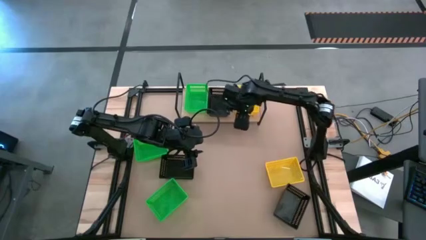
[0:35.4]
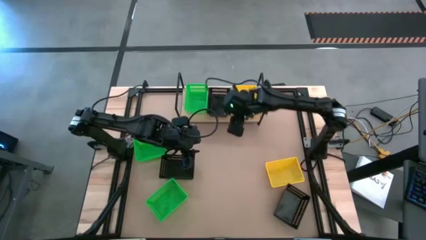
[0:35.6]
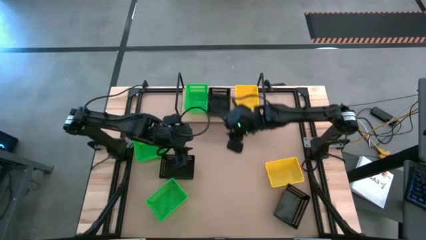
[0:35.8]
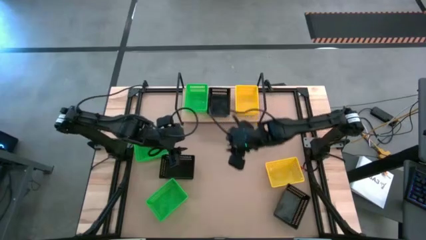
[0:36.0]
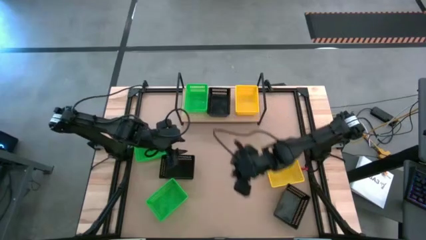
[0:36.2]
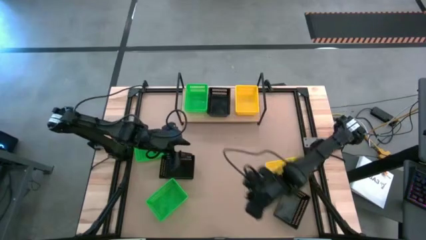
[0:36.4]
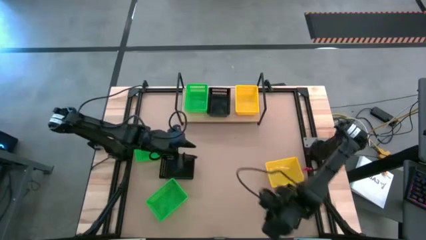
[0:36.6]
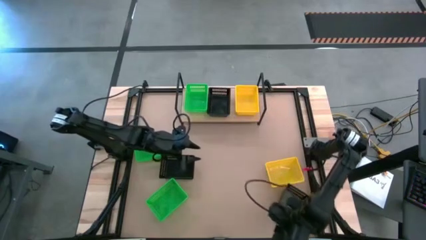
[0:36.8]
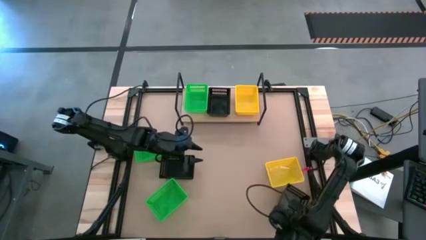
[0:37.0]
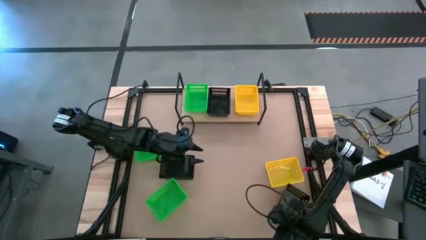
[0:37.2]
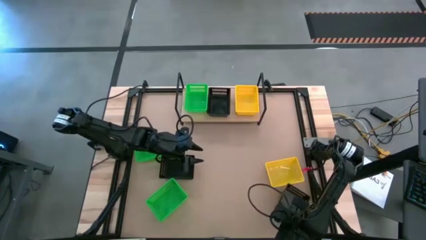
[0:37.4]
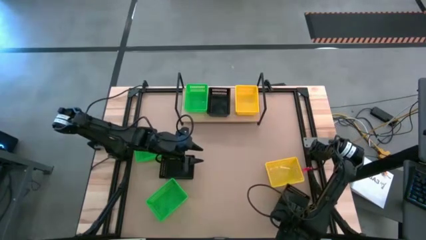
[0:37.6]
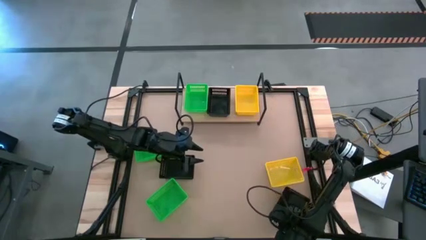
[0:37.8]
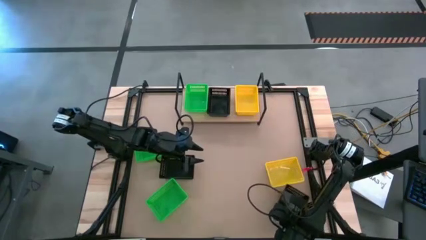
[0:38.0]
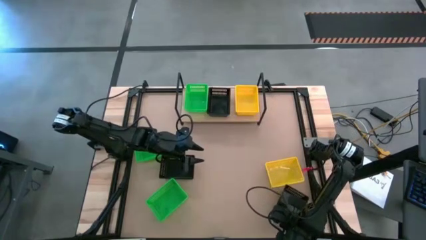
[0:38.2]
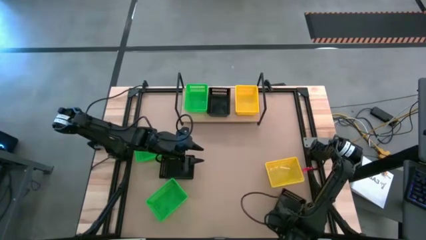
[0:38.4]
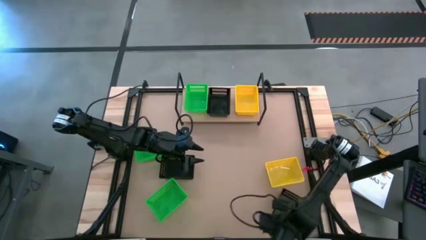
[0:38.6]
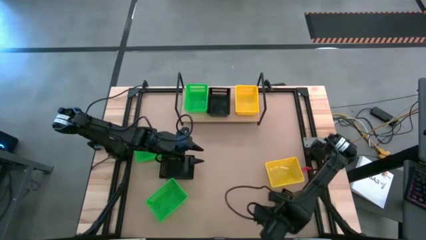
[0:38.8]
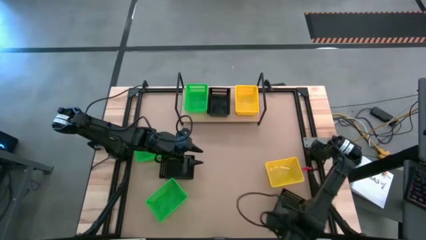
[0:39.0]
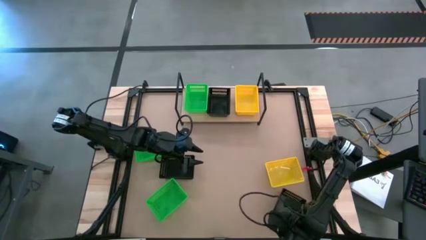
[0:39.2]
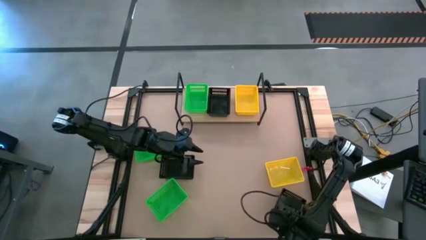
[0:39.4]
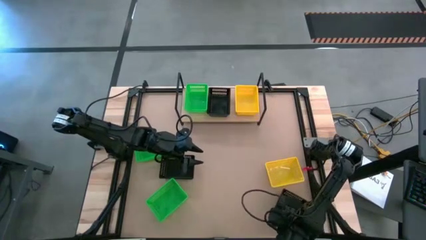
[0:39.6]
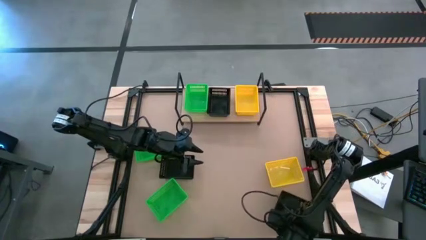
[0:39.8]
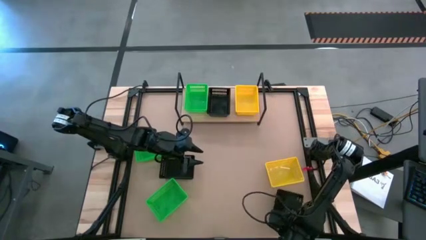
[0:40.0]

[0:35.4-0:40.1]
Task: Stack baskets on shelf by color
Stack the right black basket on top of the black basket on the shelf

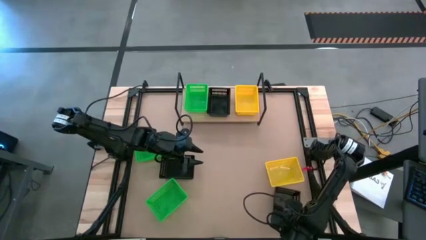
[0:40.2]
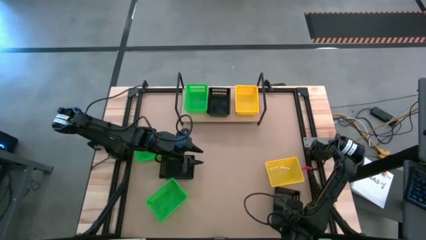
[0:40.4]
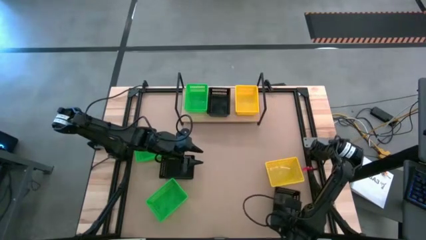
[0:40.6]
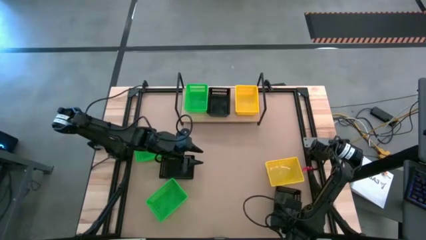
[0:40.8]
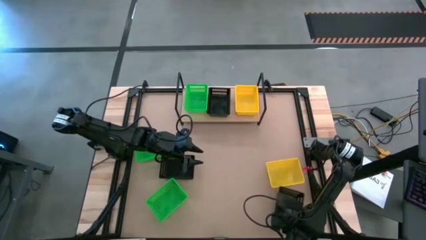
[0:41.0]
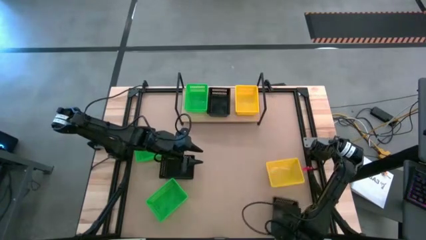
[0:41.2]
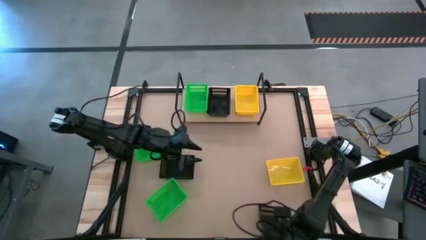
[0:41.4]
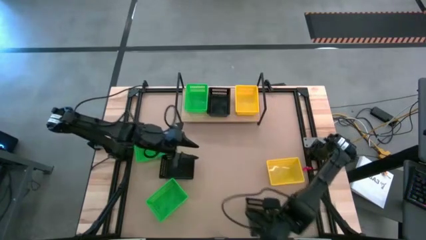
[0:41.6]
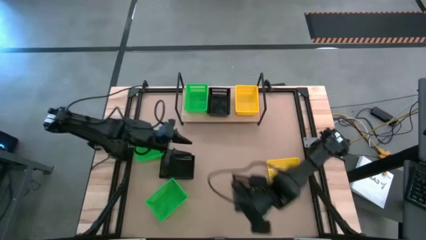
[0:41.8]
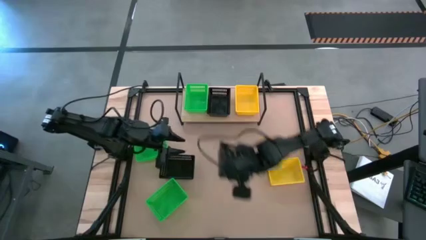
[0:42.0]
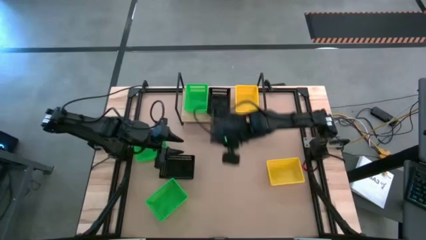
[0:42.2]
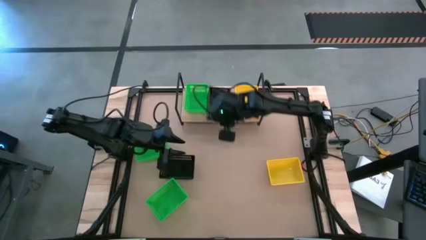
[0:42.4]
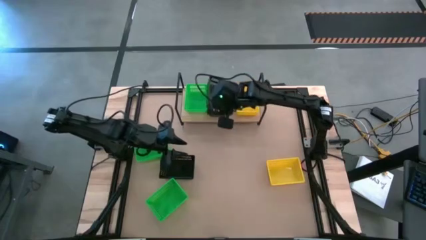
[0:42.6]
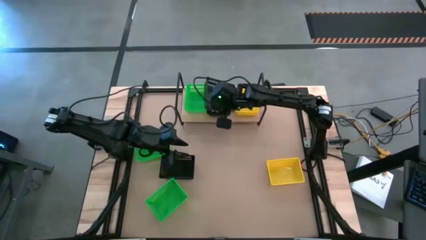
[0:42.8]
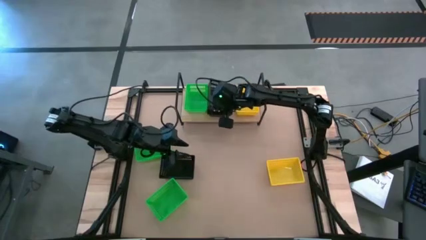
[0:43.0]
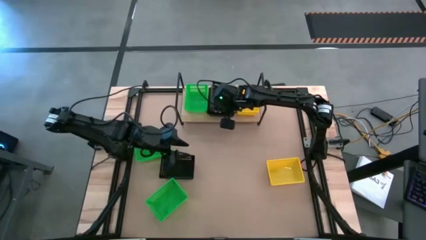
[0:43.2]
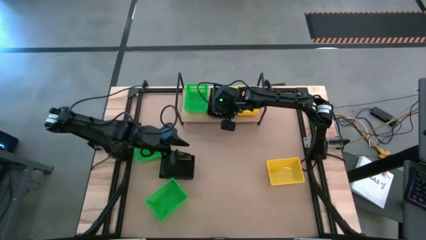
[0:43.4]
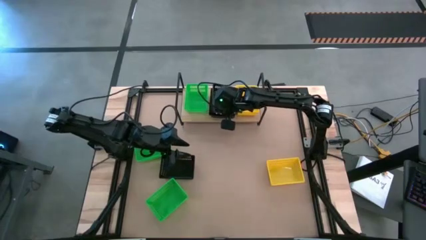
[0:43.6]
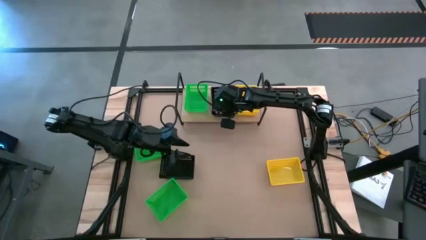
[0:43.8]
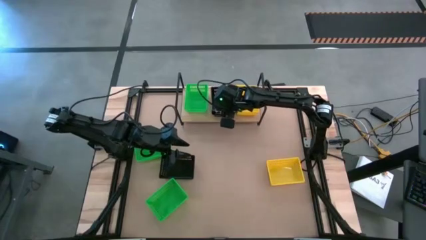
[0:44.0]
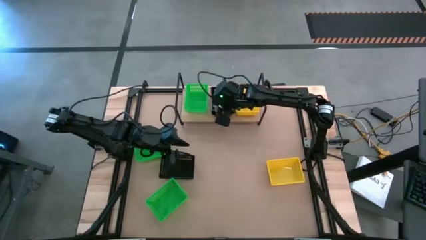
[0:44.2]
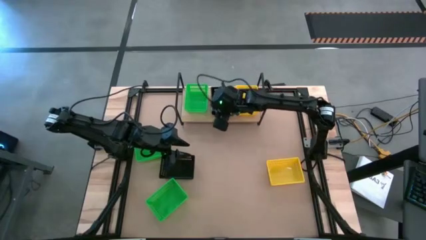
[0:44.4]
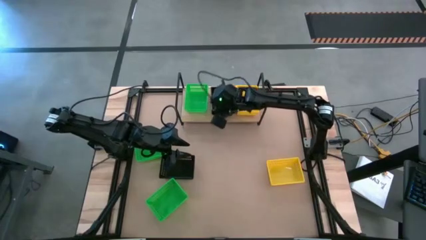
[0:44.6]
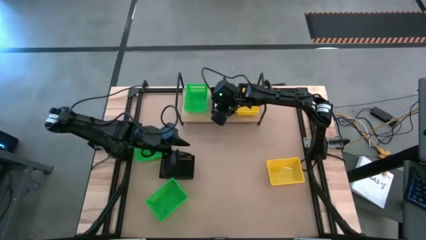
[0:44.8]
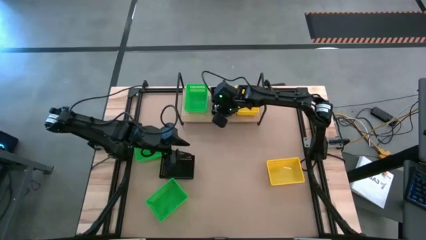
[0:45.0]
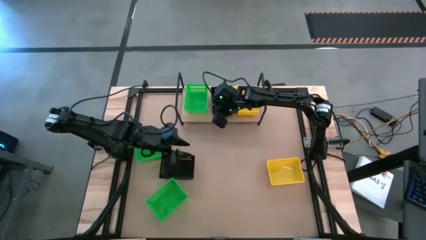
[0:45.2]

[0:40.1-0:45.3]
Stack the right black basket on top of the black basket on the shelf

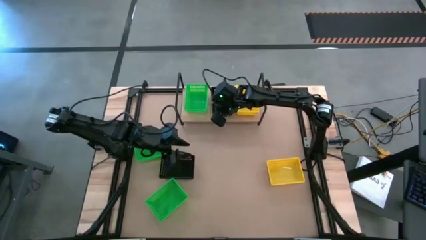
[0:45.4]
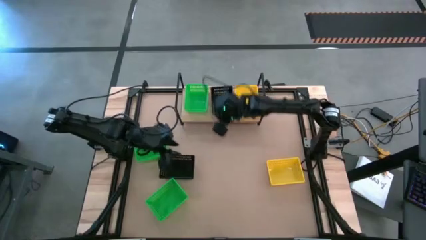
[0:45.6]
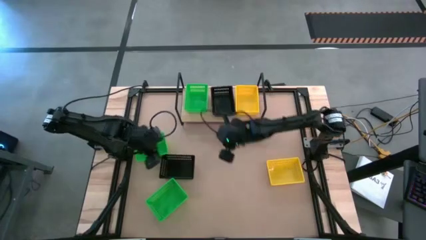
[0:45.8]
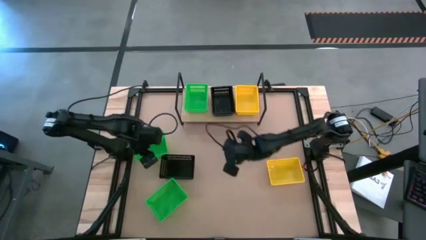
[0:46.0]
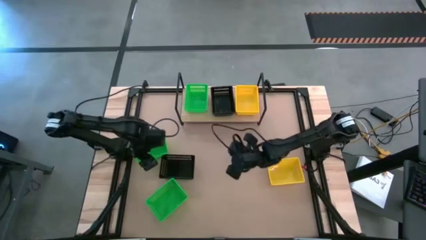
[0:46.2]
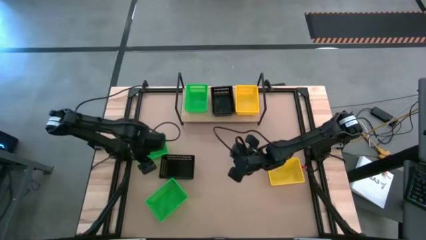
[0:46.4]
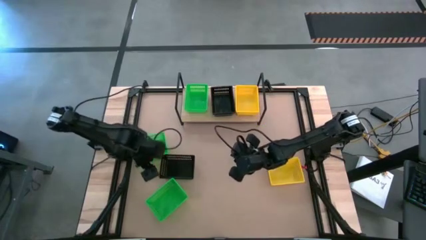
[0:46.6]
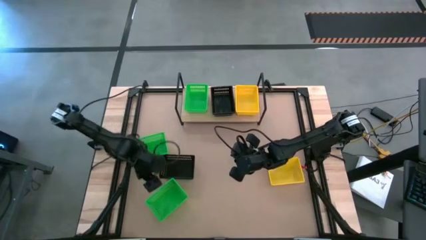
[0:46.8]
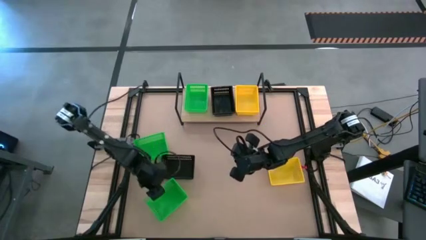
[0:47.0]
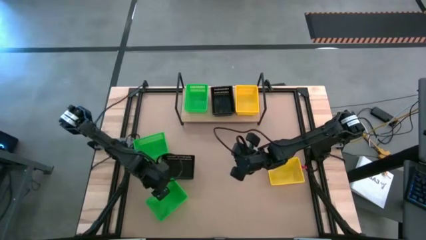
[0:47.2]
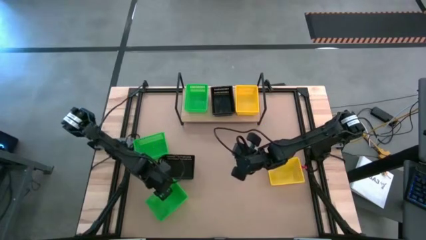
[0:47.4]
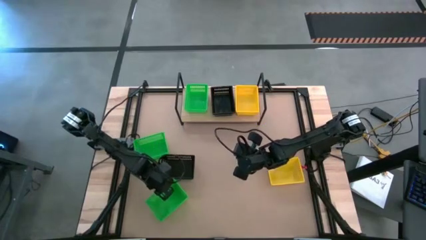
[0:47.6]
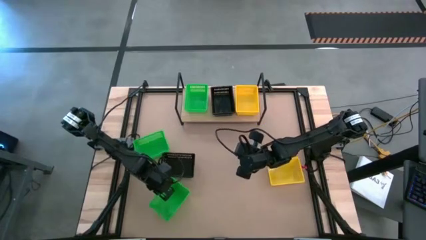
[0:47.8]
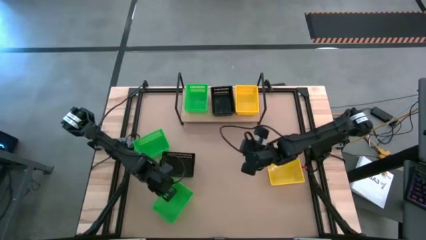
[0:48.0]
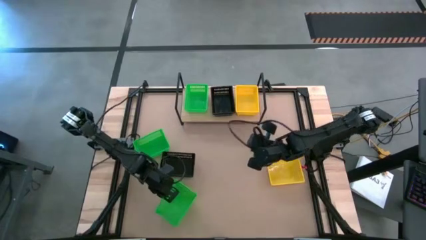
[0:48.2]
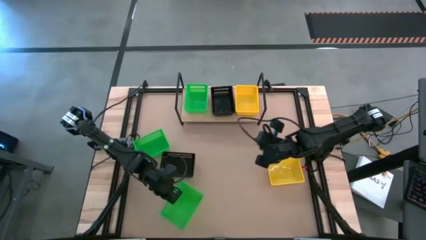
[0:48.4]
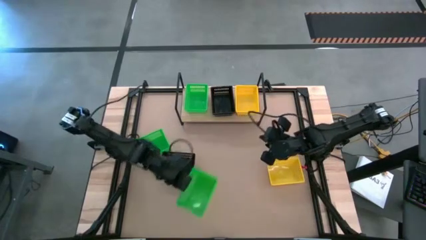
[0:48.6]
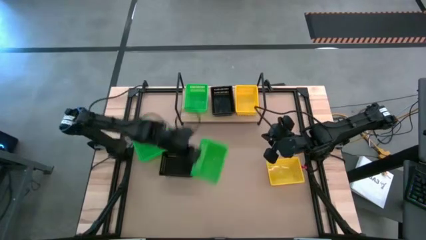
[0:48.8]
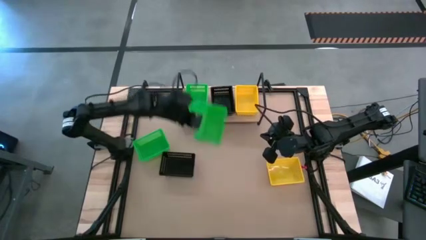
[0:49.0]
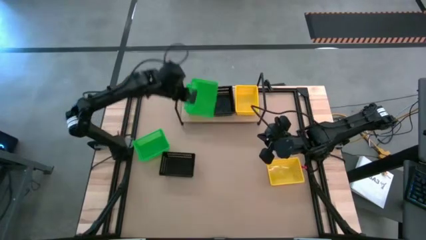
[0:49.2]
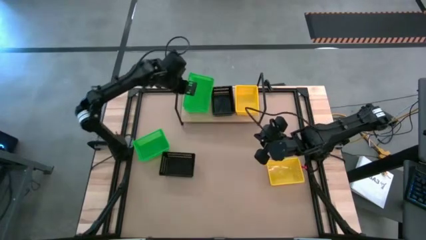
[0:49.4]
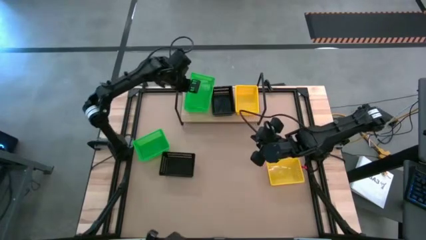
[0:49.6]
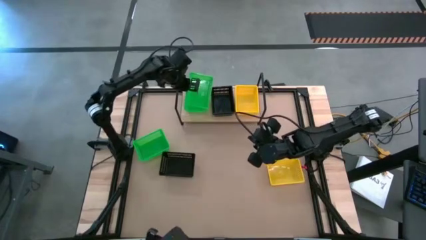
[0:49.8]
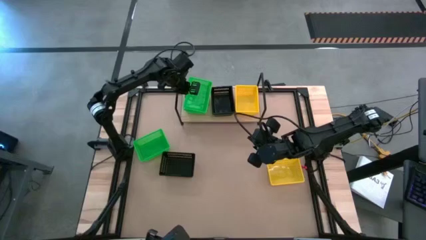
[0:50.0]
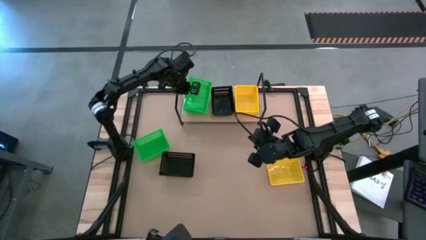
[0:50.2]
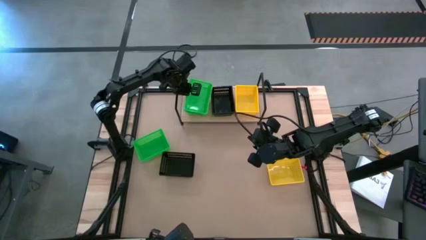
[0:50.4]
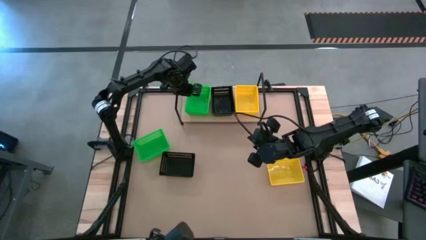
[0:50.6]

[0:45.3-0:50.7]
Stack the bottom green basket on top of the green basket on the shelf
